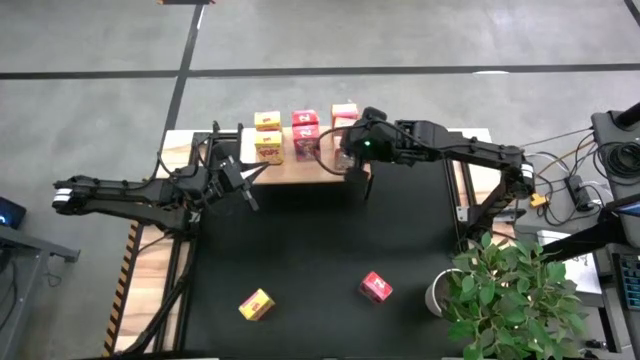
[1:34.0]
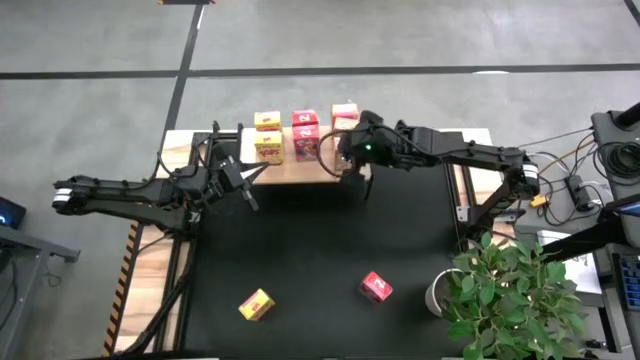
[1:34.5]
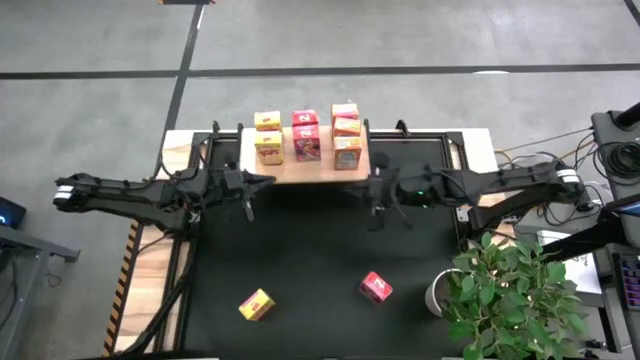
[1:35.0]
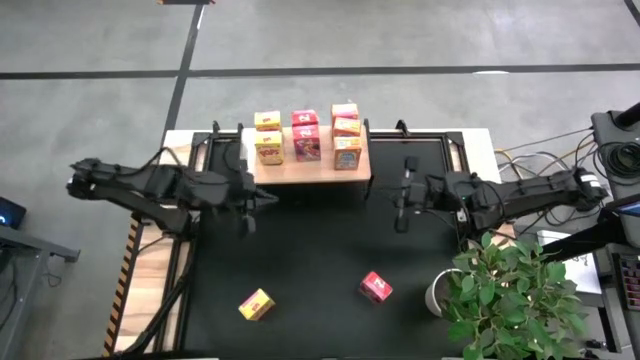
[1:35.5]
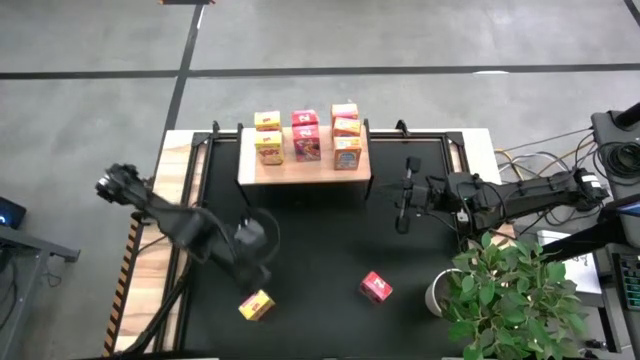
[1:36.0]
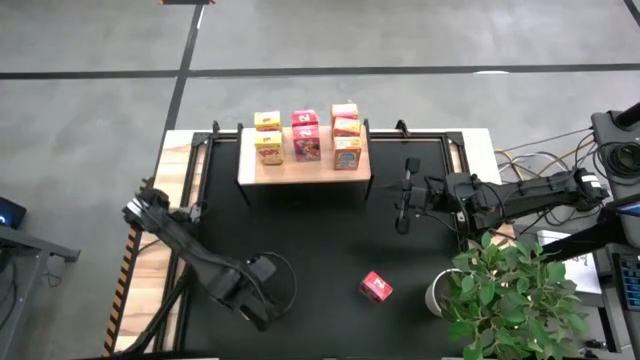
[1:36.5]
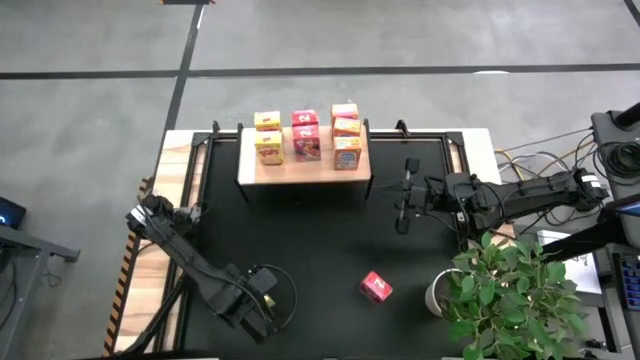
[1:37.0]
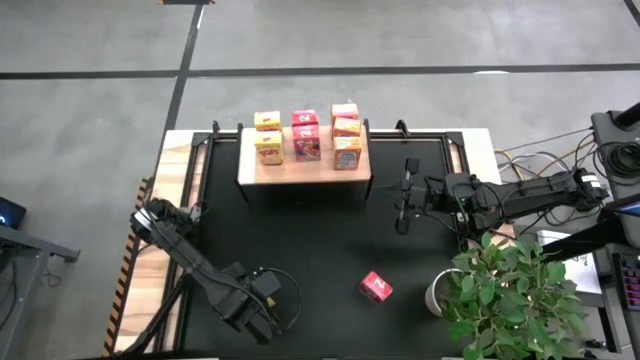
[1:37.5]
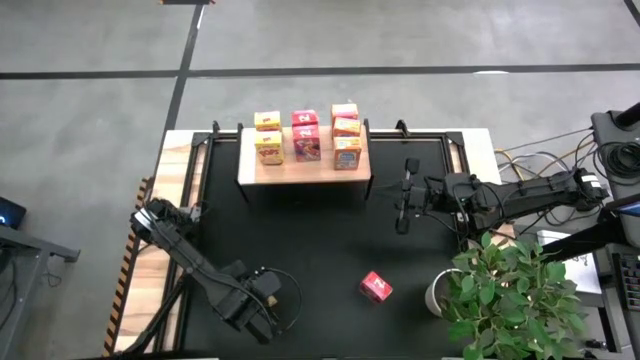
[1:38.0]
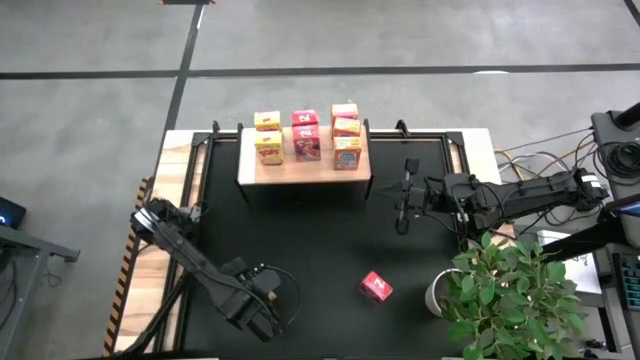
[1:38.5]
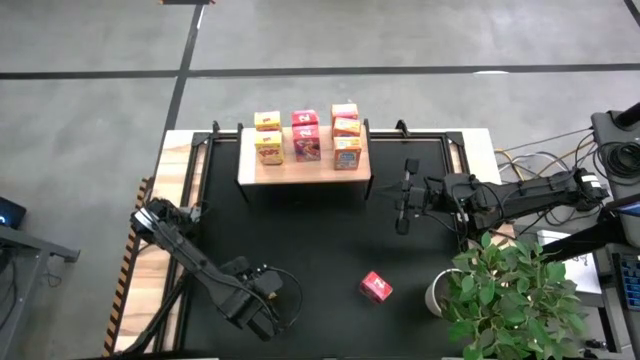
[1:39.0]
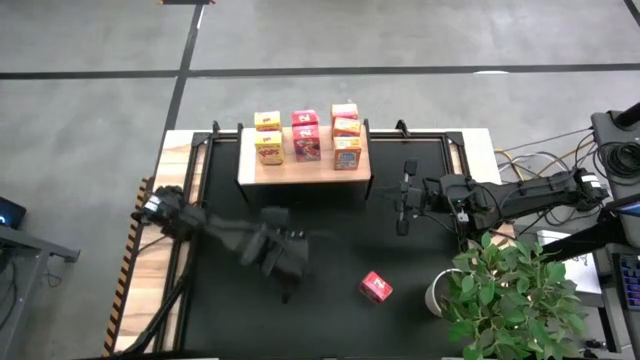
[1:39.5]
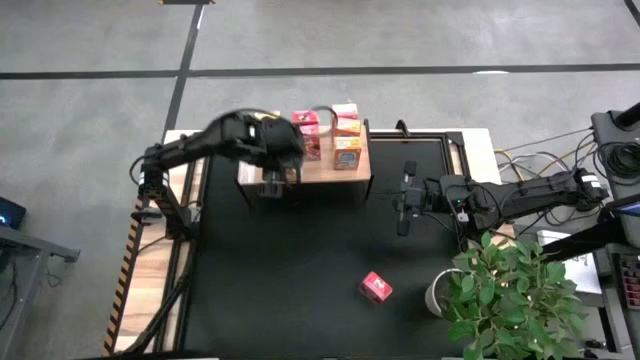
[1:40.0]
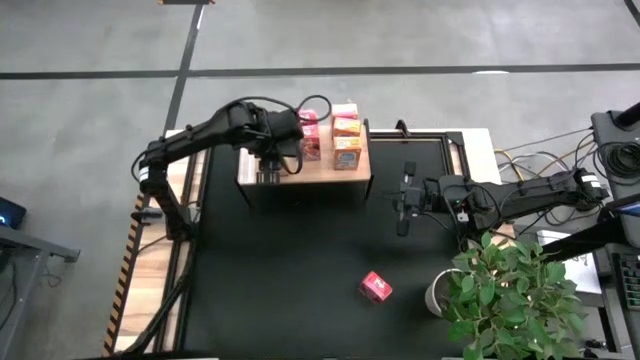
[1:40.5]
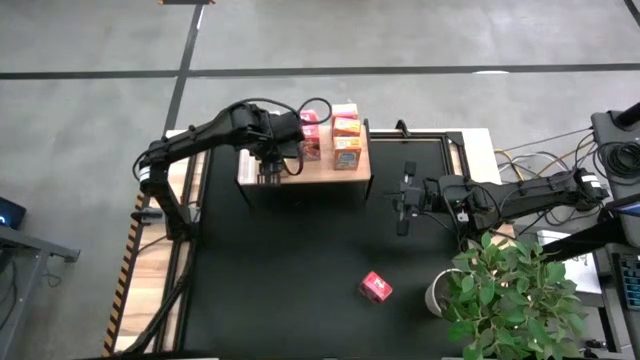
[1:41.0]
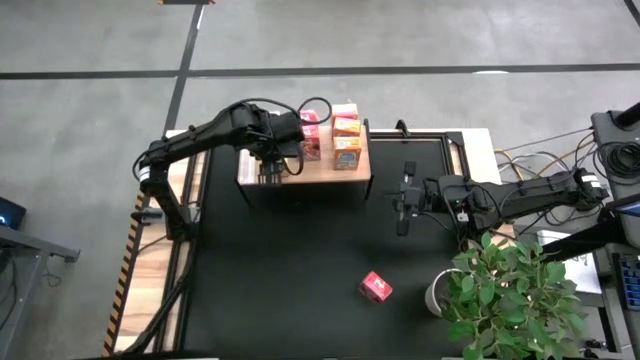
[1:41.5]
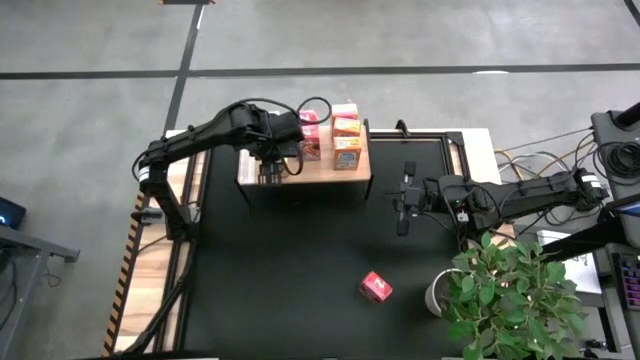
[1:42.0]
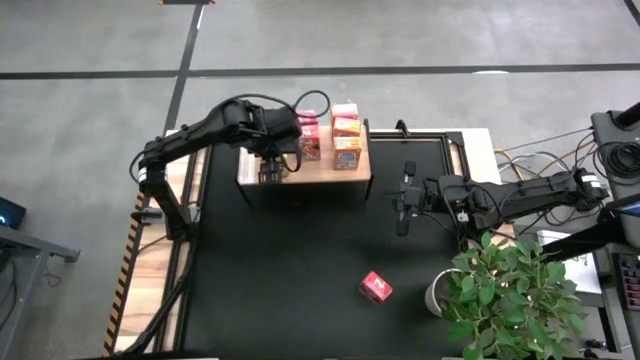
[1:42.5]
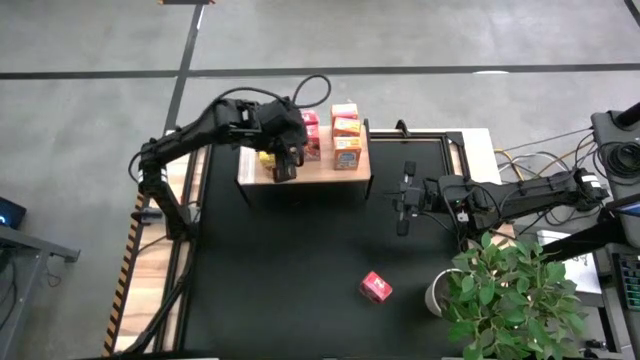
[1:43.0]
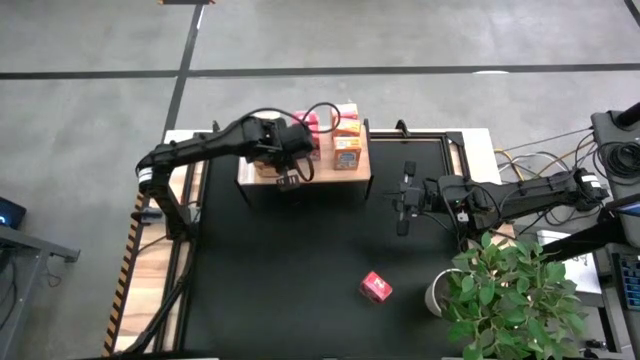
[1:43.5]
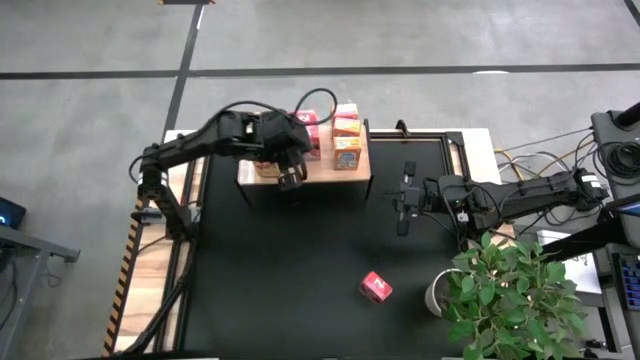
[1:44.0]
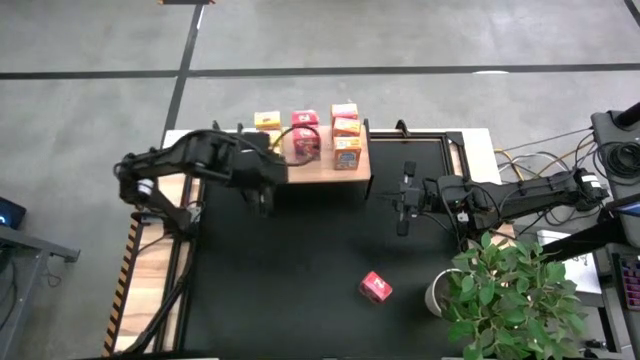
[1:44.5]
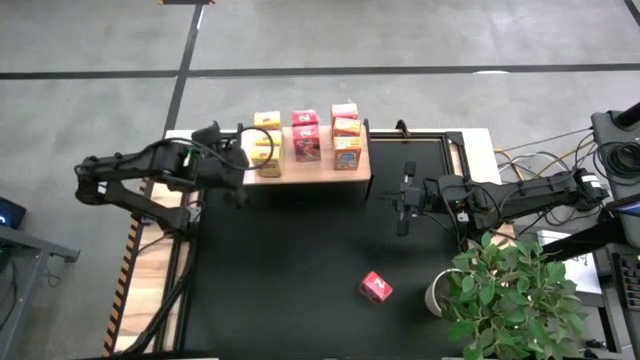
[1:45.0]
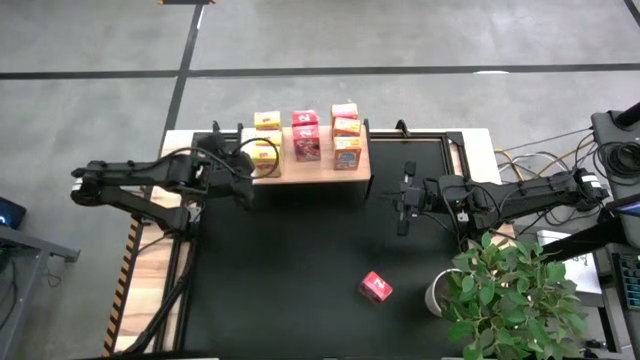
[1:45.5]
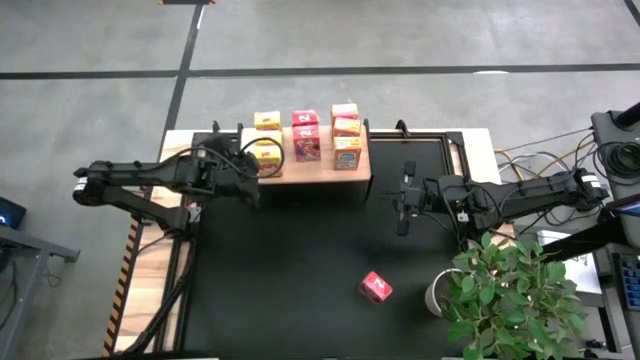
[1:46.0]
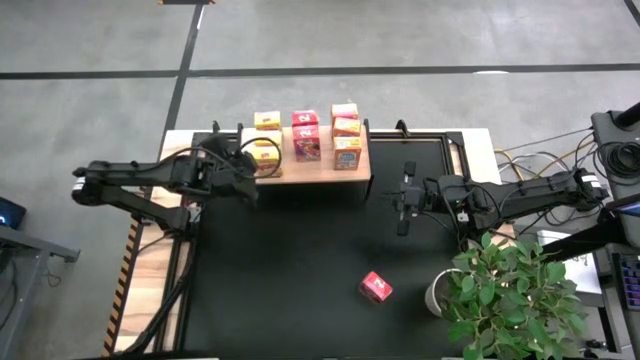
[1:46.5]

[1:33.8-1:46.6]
Task: Stack cereal on shelf
Put the yellow cereal box aligned with the other yellow cereal boxes on the shelf

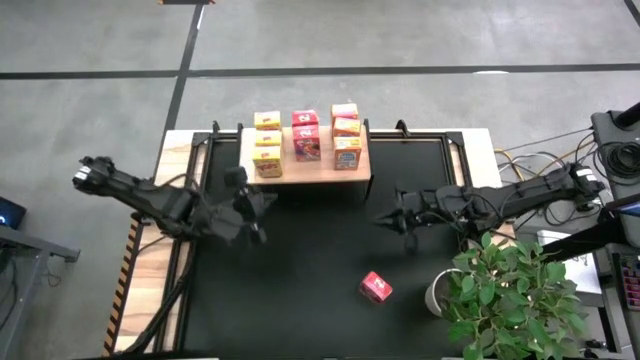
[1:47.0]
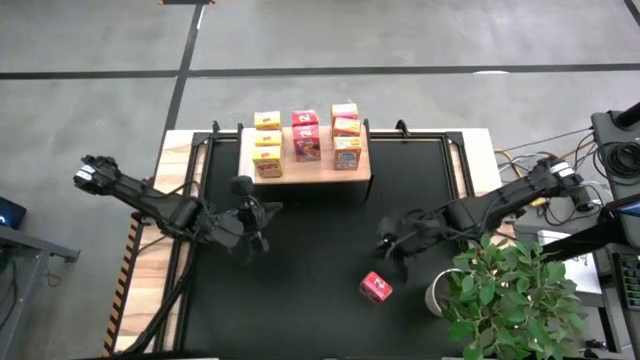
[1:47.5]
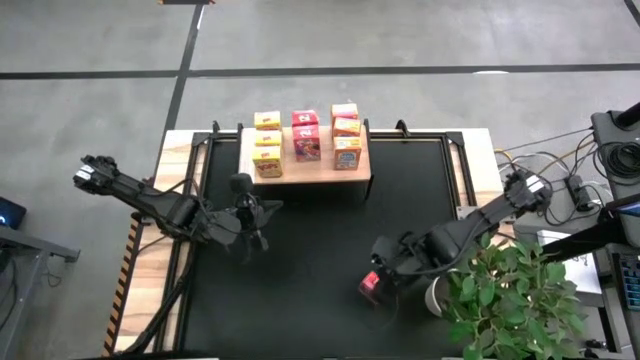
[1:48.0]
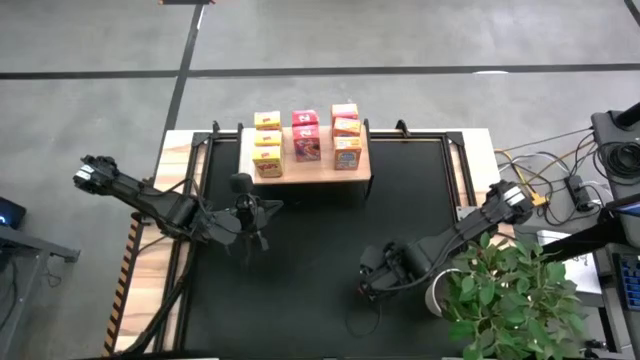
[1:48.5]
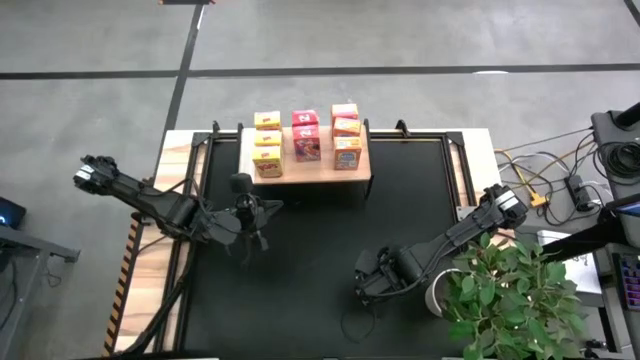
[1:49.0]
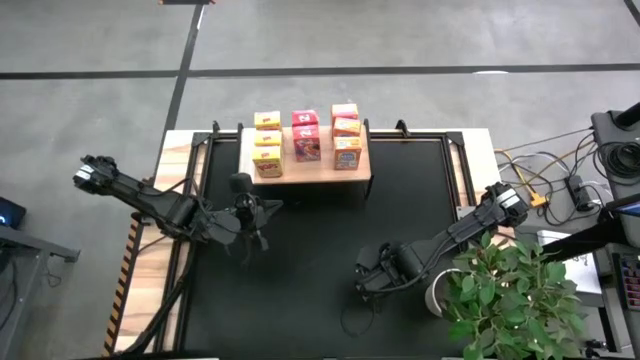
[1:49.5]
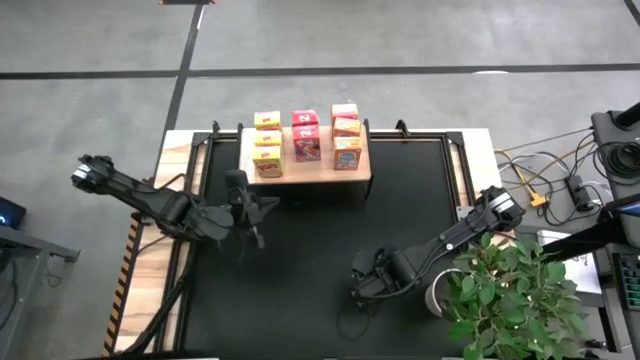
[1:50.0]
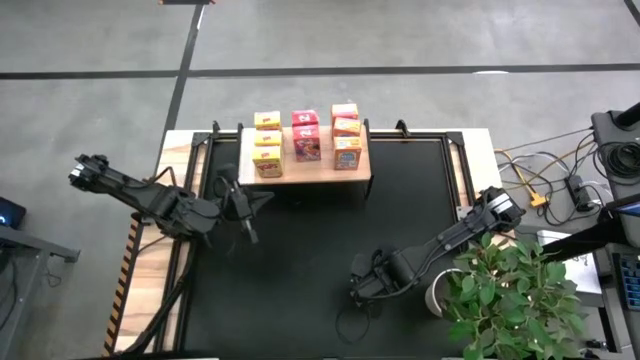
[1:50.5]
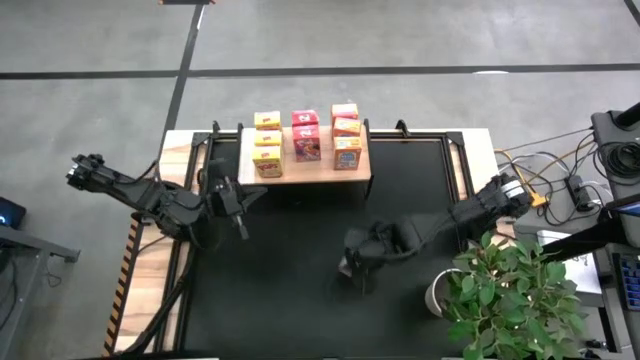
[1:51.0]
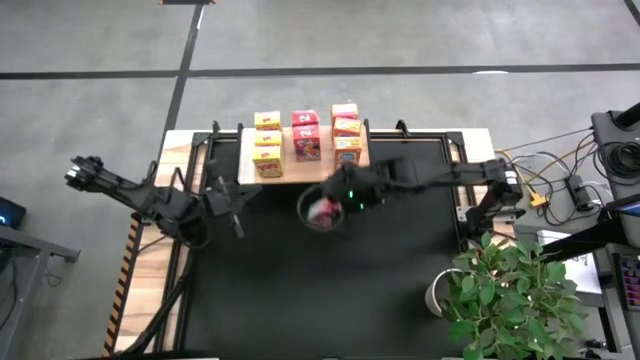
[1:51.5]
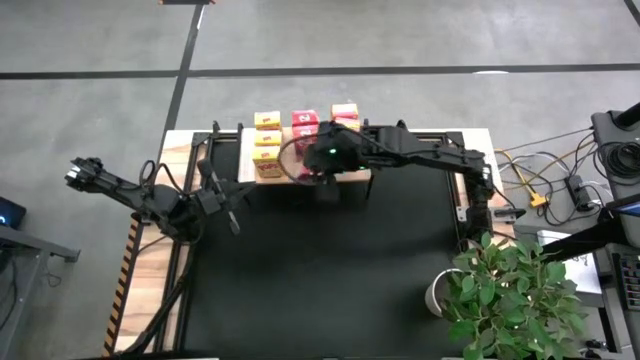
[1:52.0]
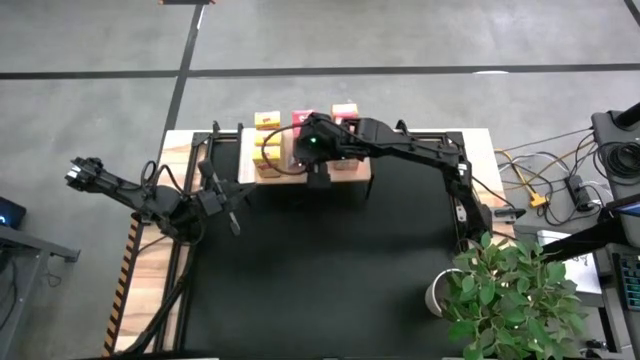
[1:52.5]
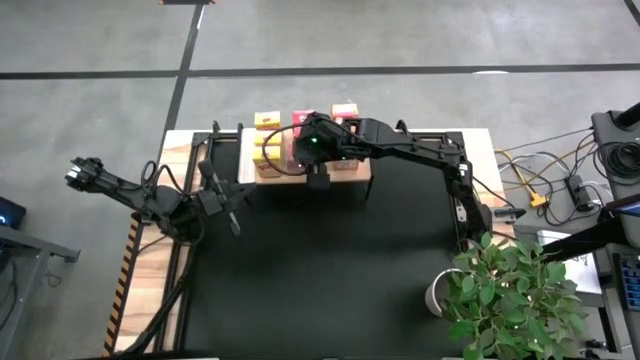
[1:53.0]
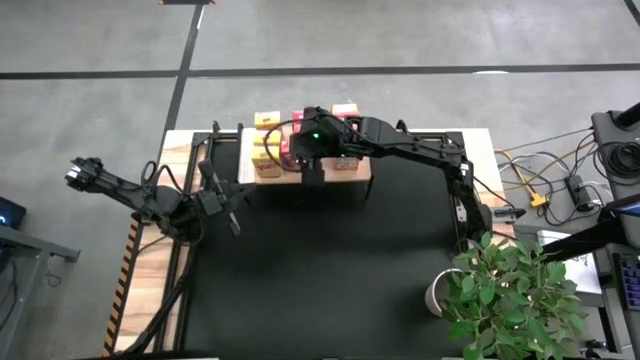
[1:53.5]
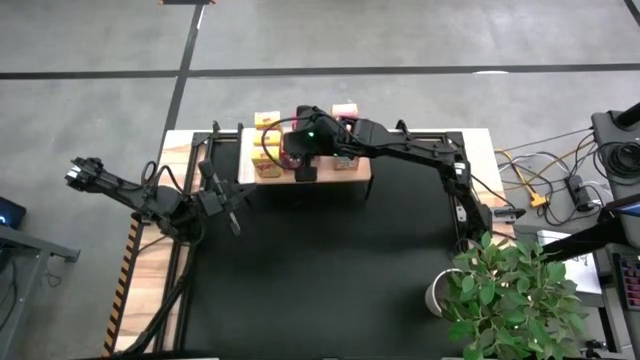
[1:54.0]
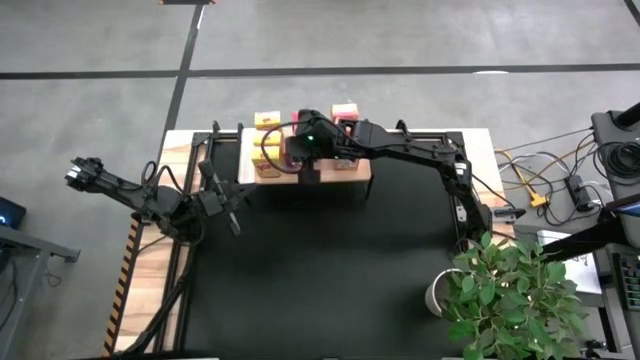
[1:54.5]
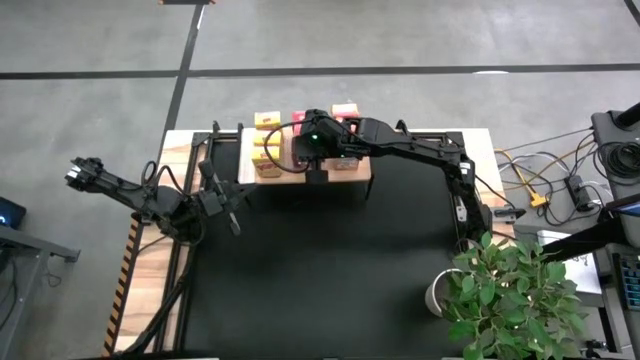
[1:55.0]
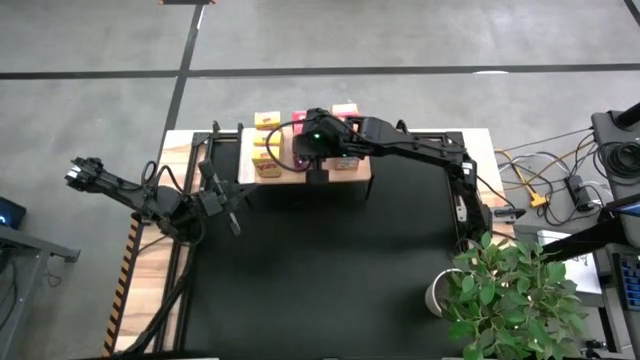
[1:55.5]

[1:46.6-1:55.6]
Put the red cereal box aligned with the other red cereal boxes on the shelf

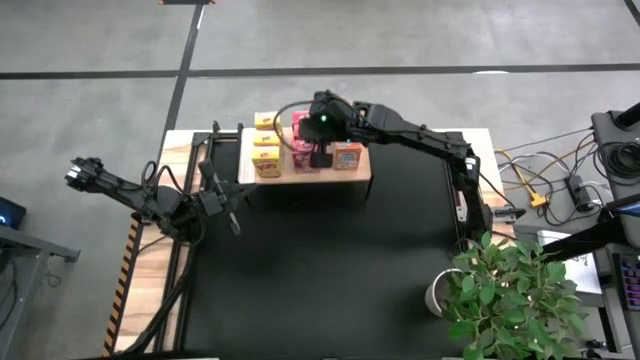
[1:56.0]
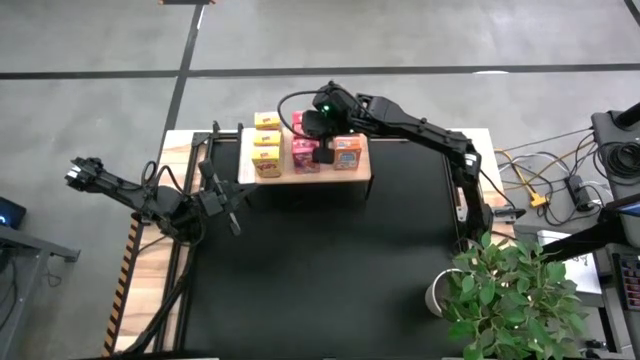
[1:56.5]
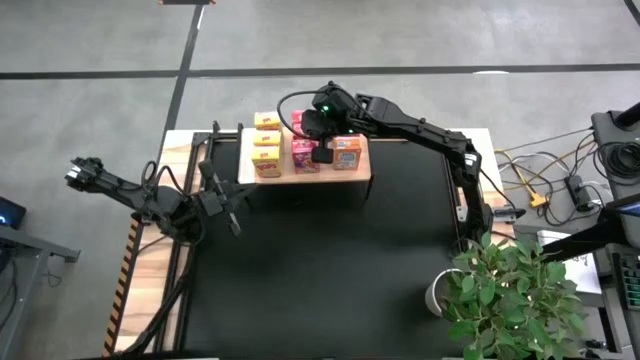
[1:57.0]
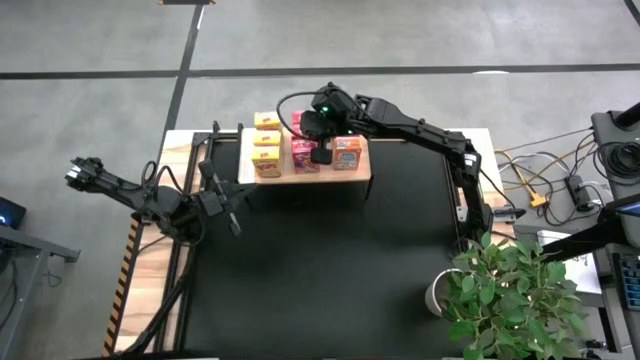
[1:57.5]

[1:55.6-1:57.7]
Adjust the red cereal box on the shelf
